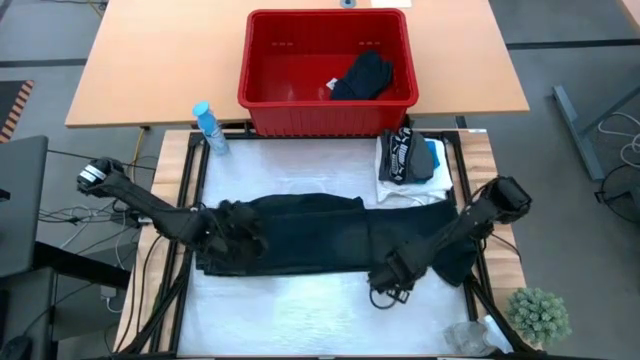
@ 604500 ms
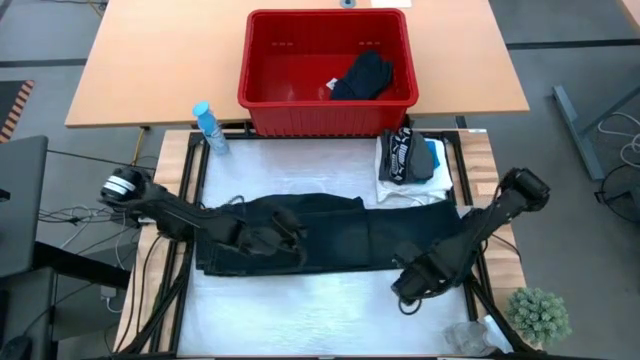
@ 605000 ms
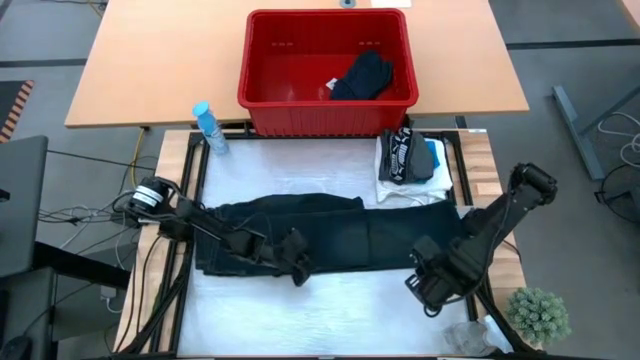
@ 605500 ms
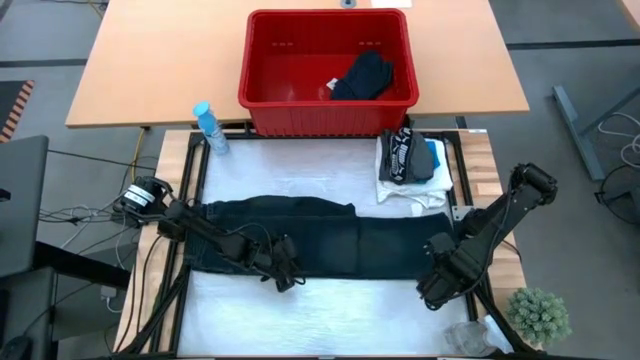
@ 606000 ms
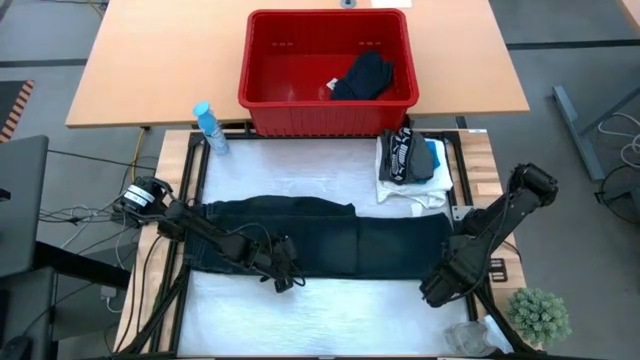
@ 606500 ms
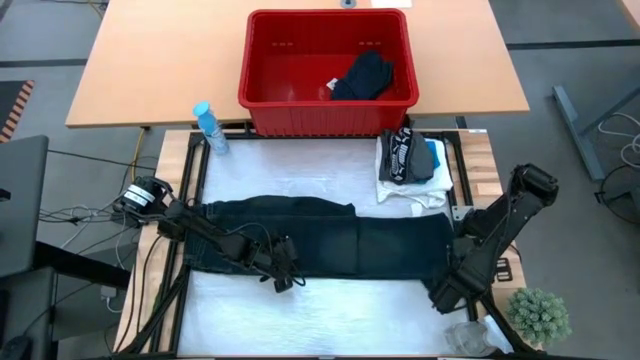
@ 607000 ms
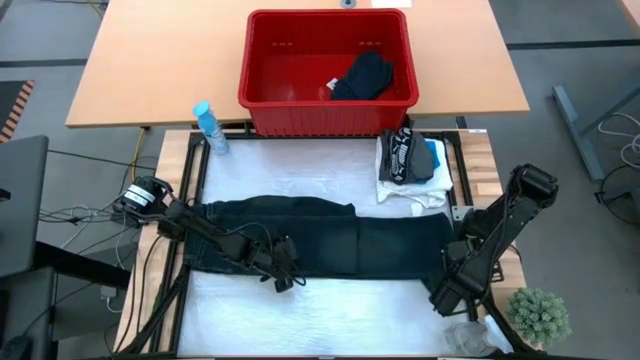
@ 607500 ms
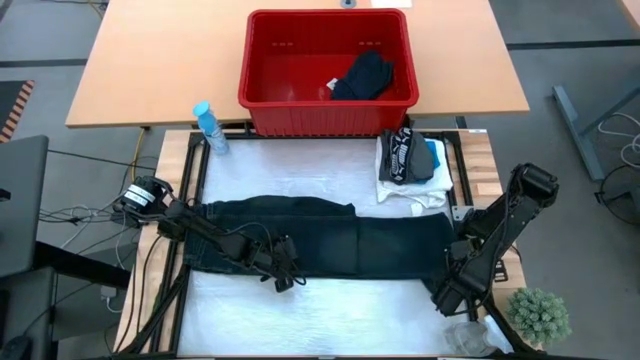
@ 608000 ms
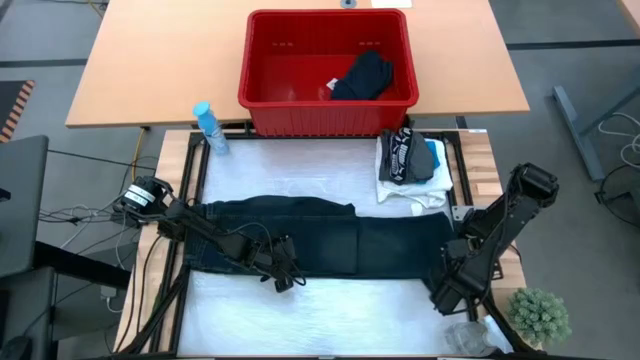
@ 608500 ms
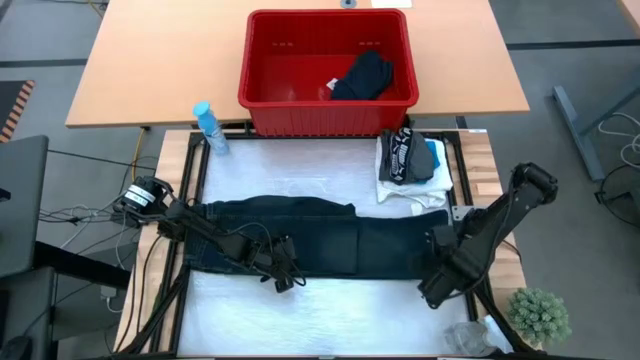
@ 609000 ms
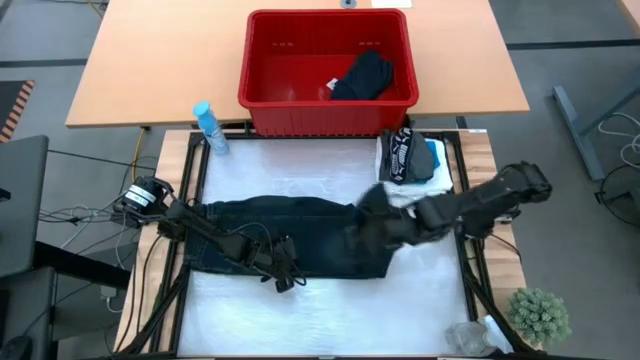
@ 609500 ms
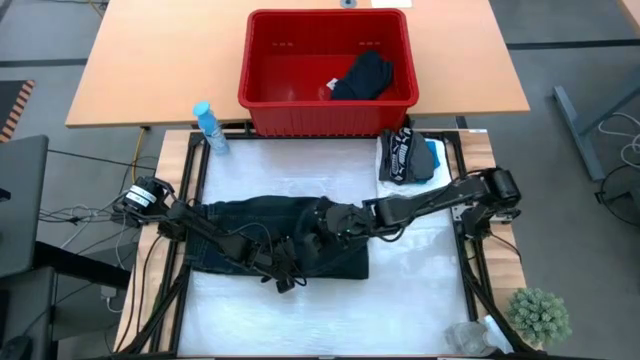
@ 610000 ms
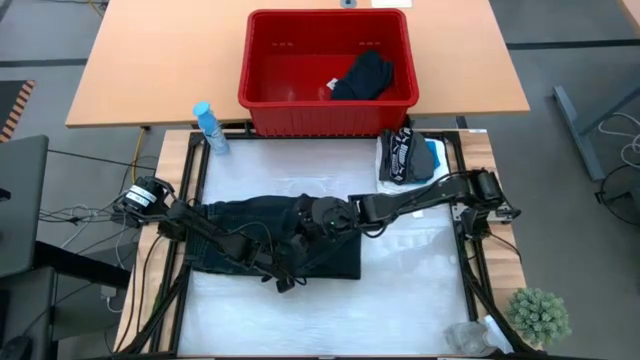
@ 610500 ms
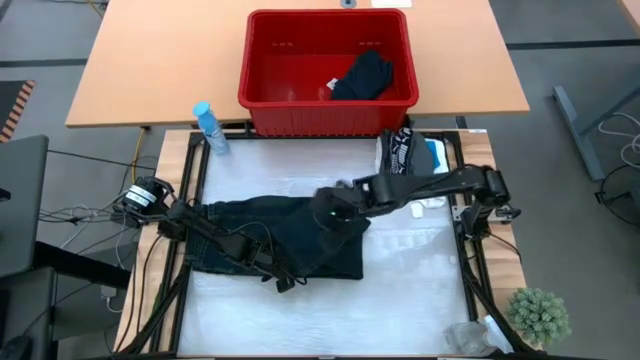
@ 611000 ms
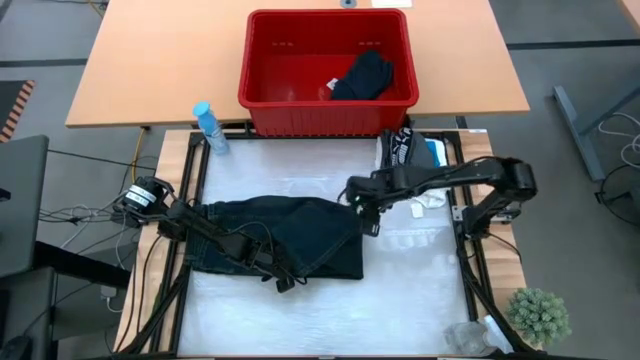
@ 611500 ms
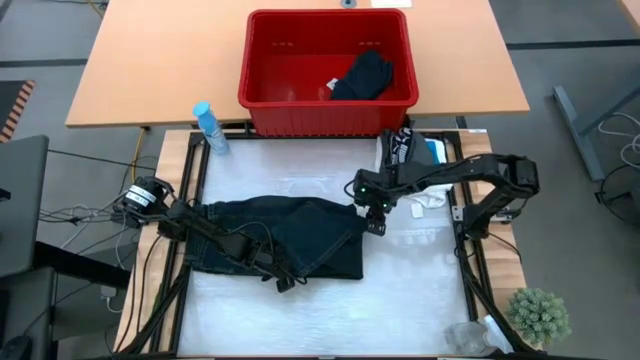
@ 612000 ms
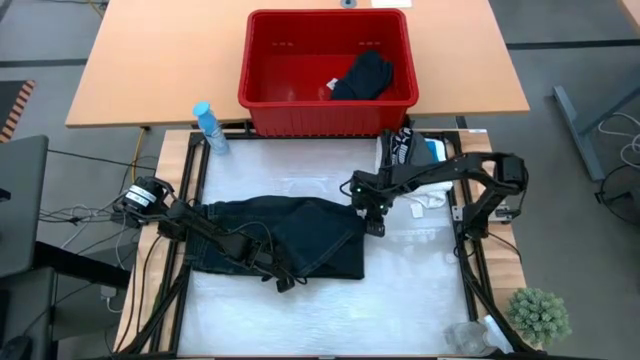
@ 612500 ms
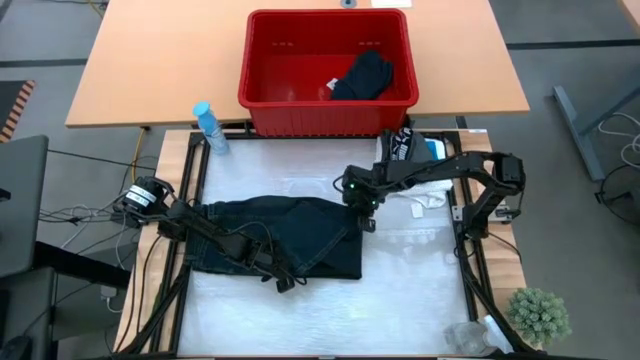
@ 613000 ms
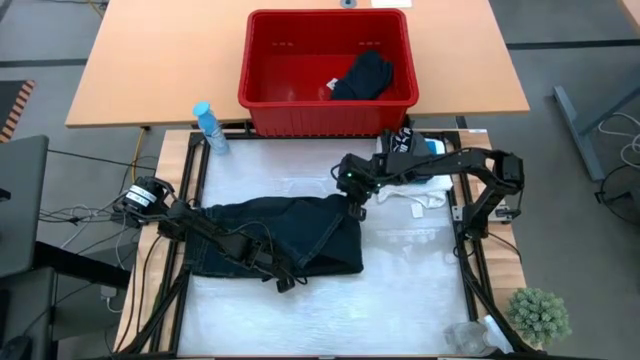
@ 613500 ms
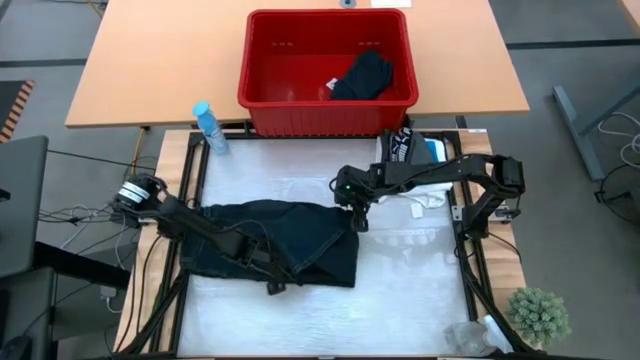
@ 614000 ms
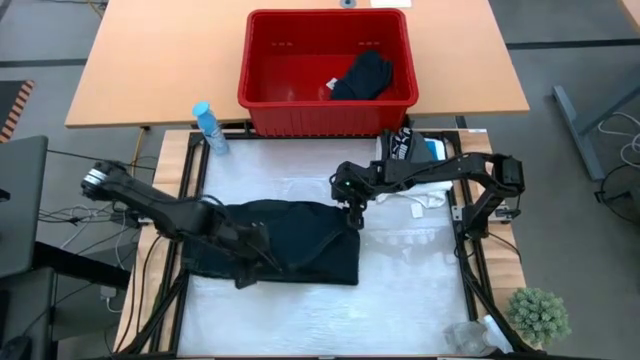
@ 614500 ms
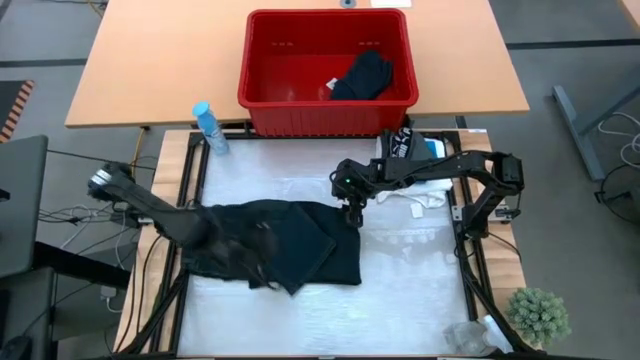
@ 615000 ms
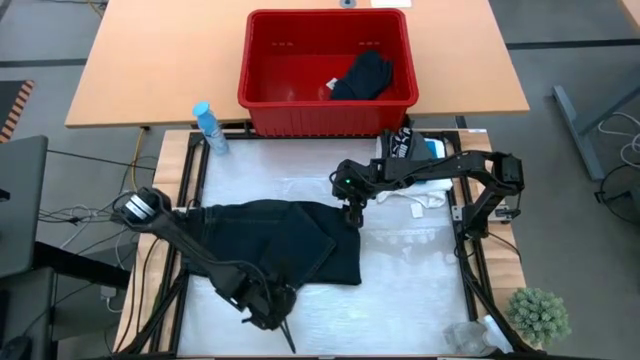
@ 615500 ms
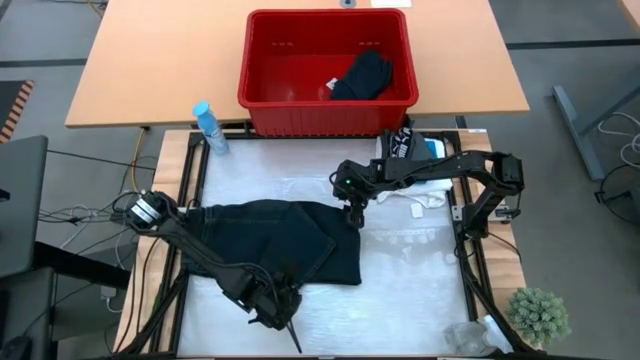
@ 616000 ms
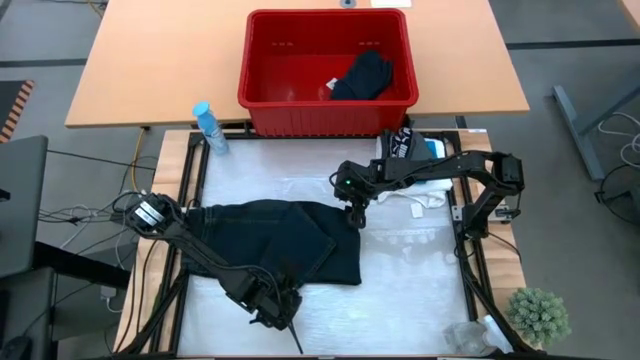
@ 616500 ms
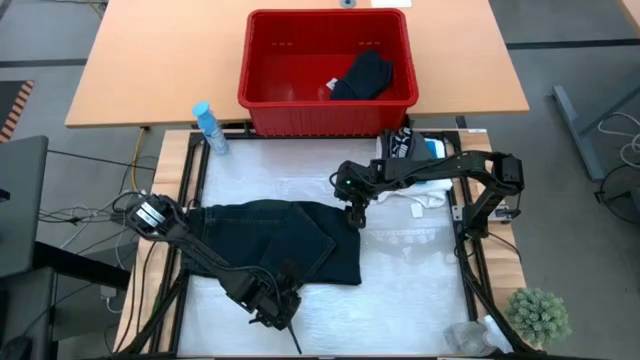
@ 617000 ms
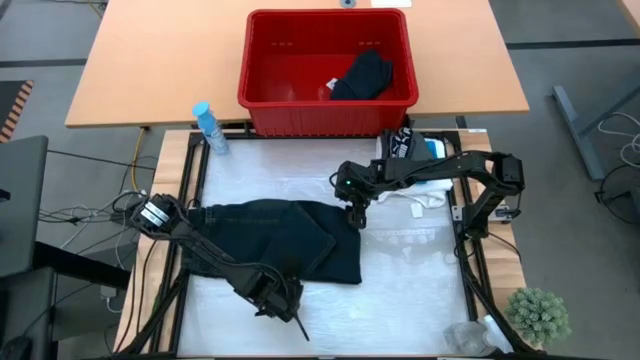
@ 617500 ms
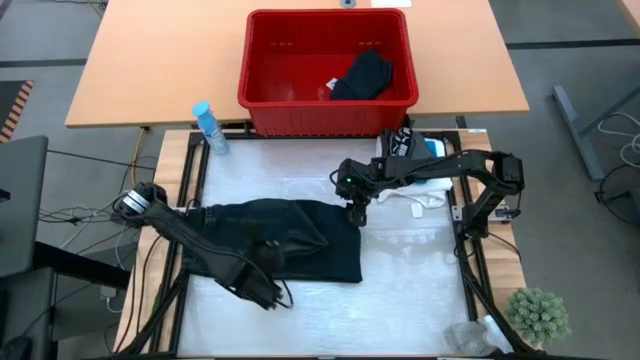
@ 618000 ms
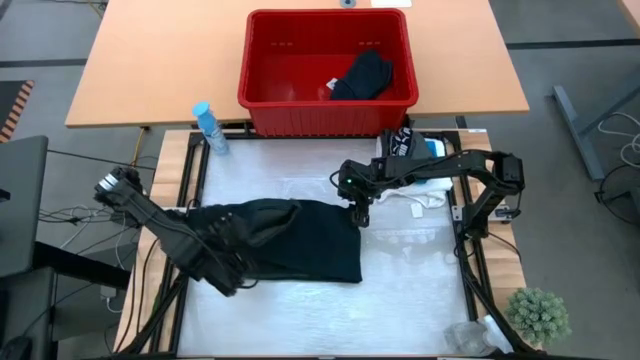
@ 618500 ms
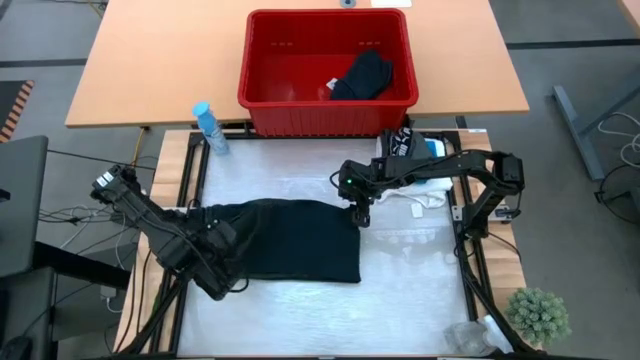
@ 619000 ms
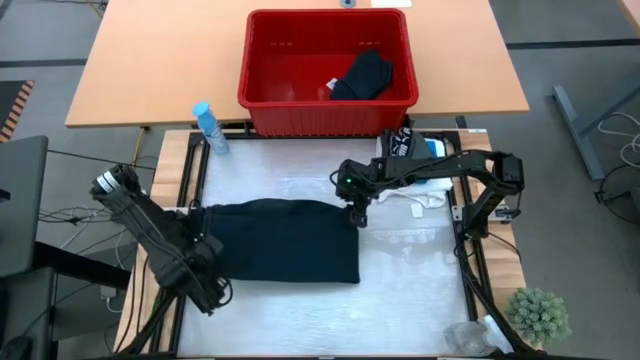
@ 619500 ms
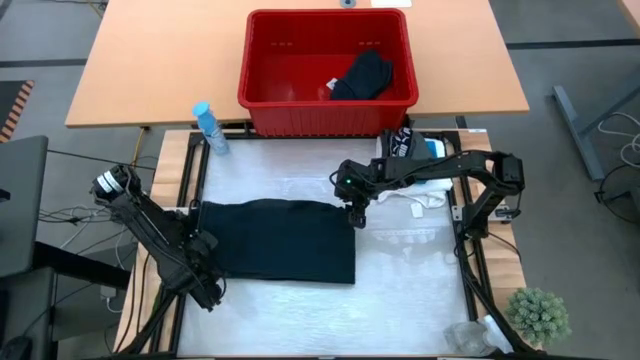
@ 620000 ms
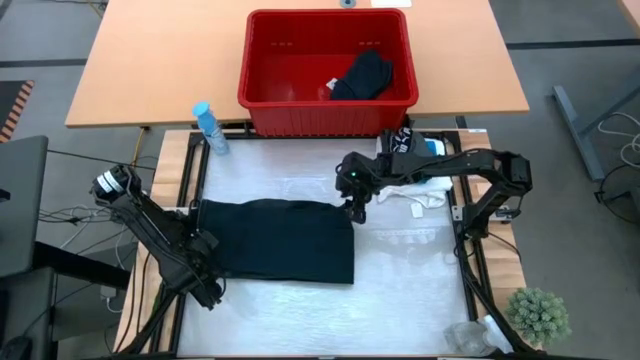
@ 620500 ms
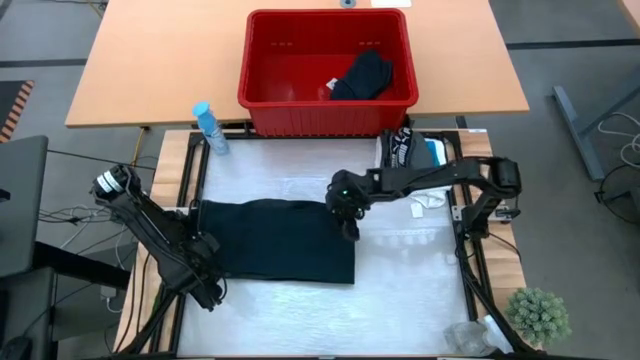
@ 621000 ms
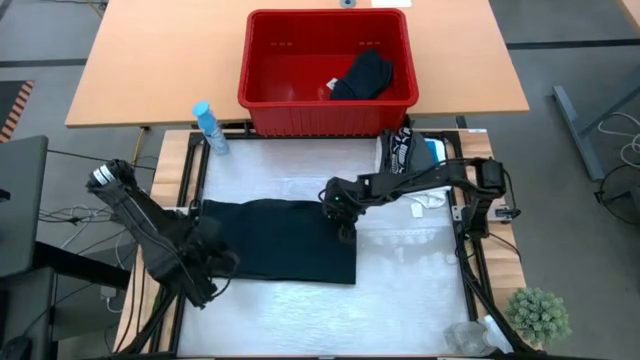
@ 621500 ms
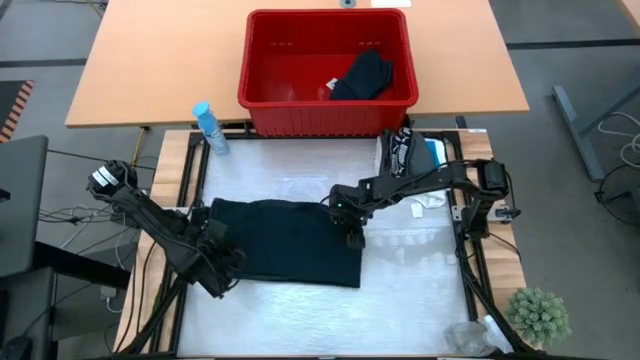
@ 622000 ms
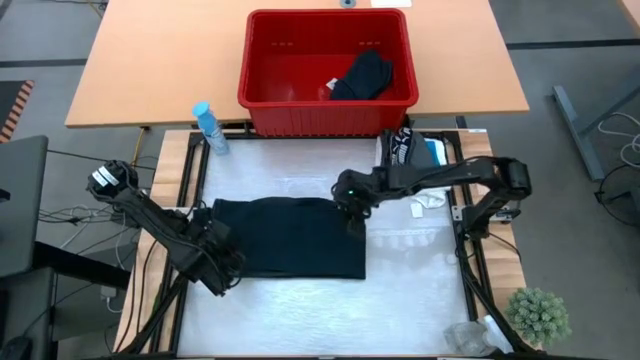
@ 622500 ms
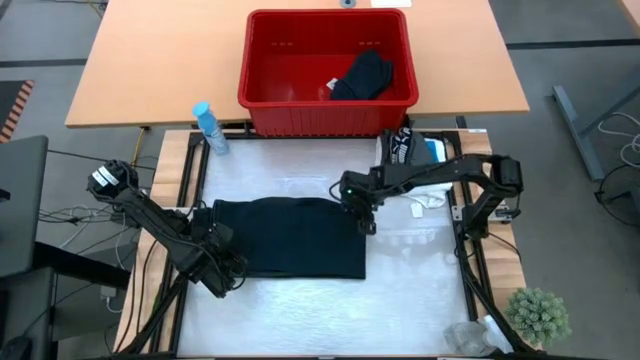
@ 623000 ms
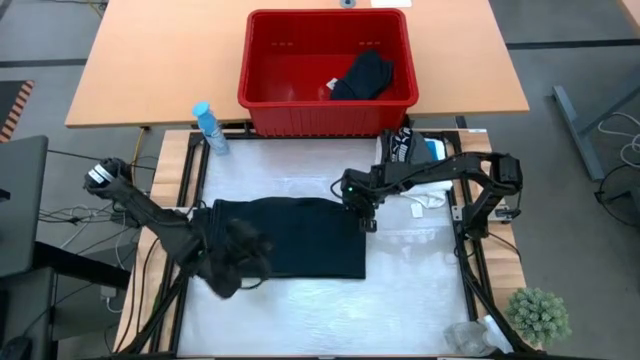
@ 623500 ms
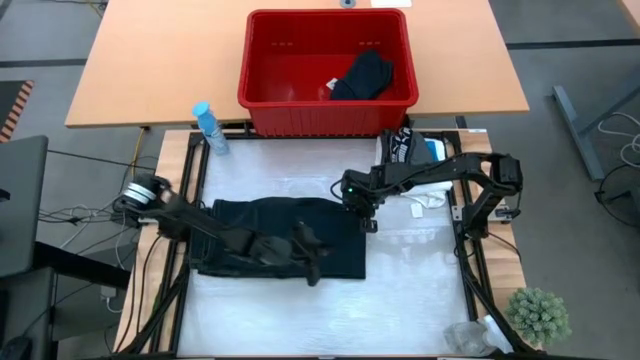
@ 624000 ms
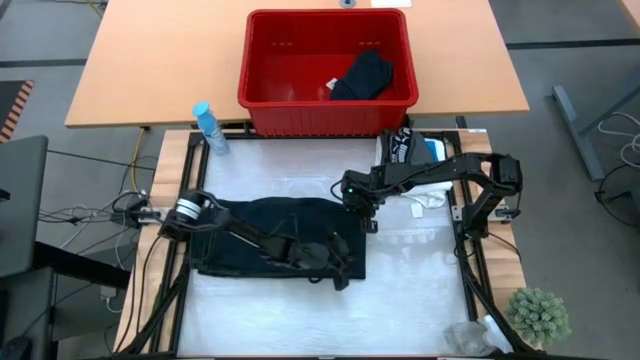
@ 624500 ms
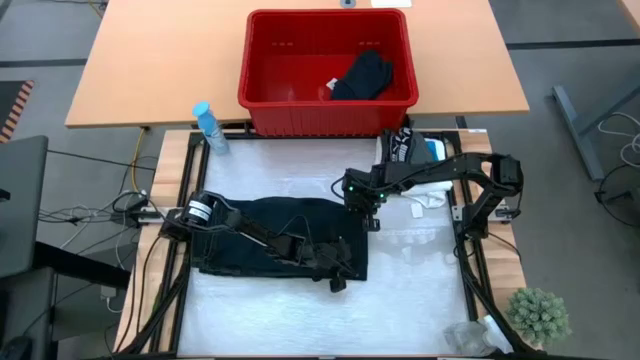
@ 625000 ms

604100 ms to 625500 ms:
Task: Fold laundry
Fold the blue pants

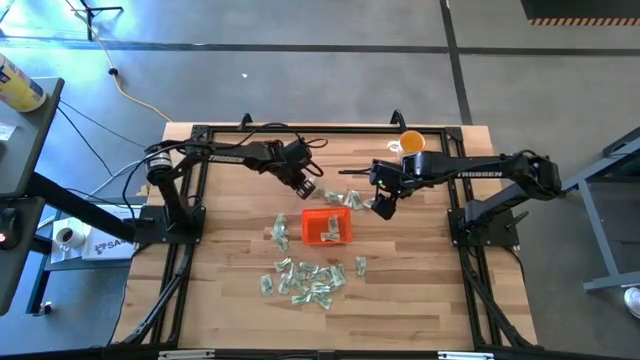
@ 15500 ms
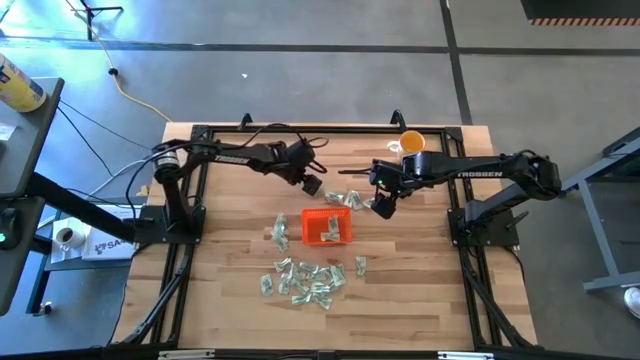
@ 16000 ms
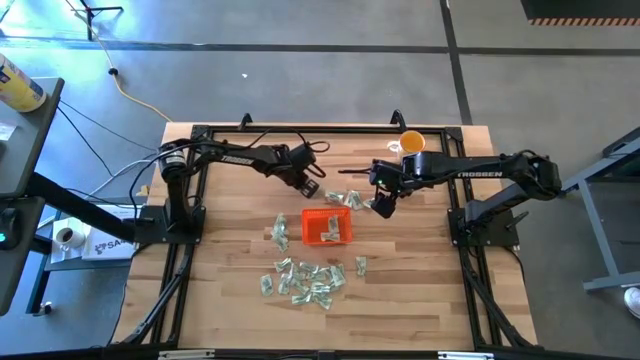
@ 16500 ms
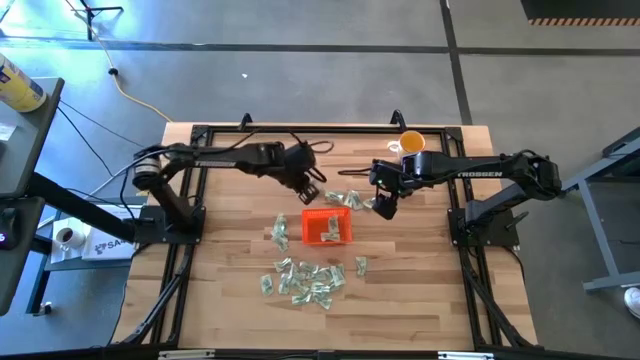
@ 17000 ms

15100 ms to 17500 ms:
Task: Pick and place Stevia / Truvia into bins
Put the stevia packet into the orange bin
